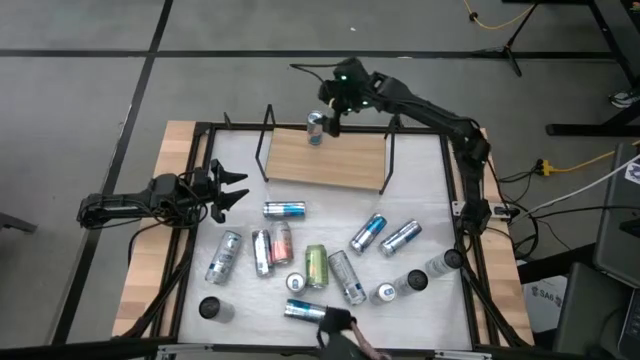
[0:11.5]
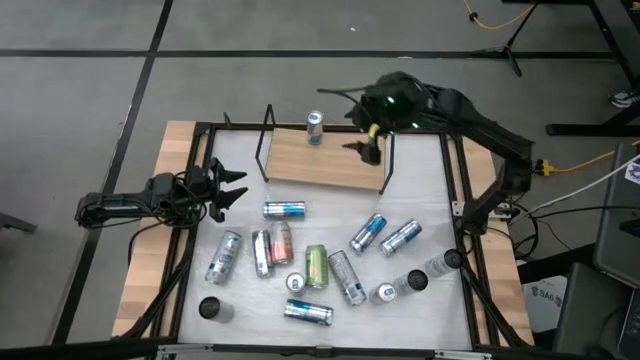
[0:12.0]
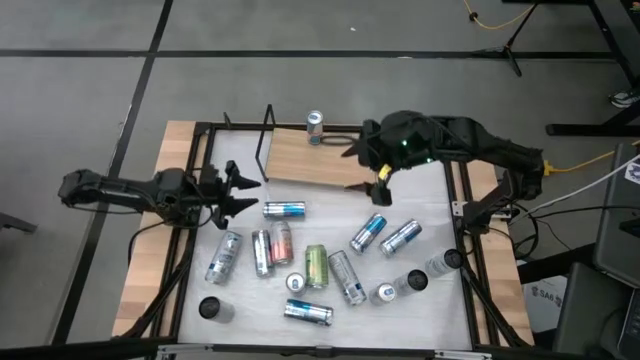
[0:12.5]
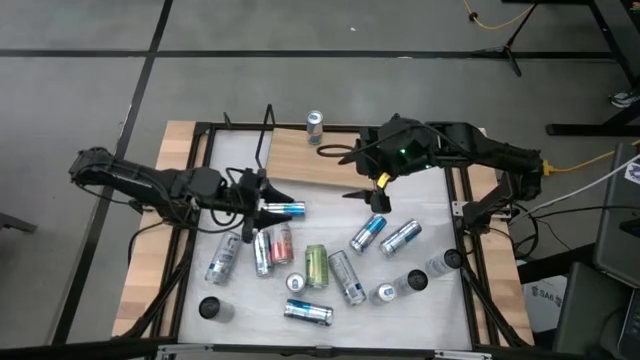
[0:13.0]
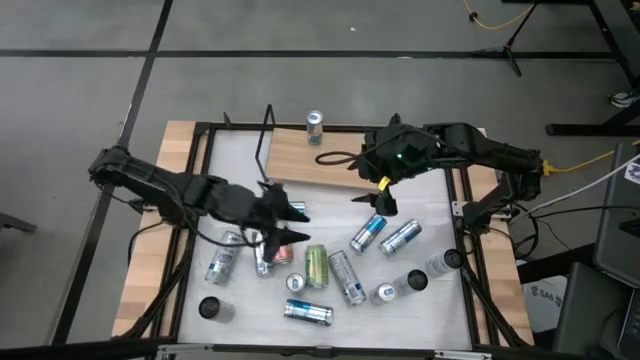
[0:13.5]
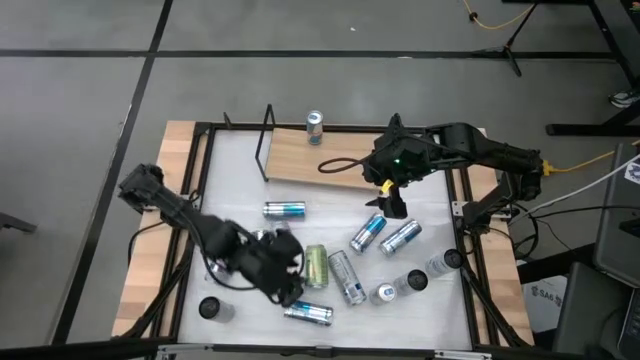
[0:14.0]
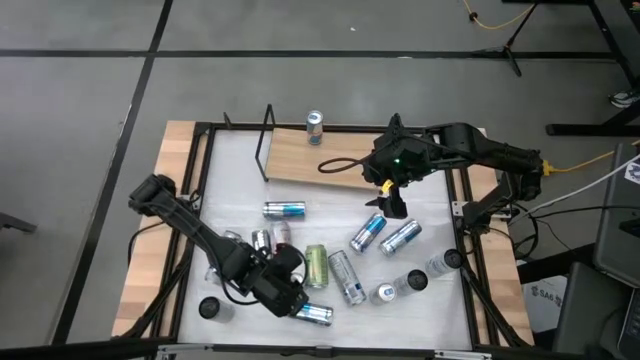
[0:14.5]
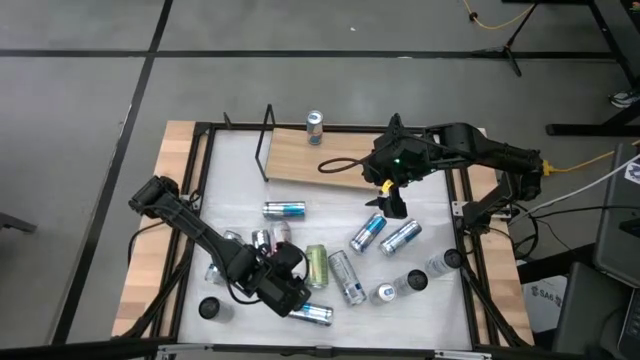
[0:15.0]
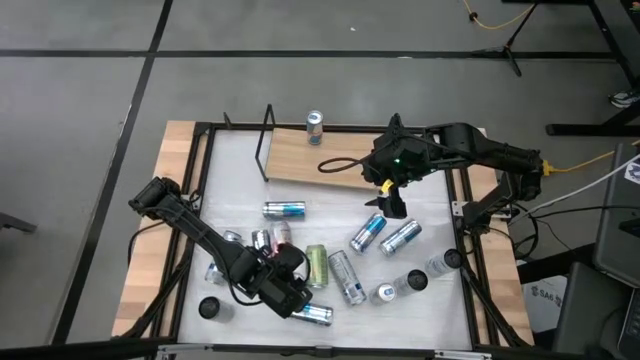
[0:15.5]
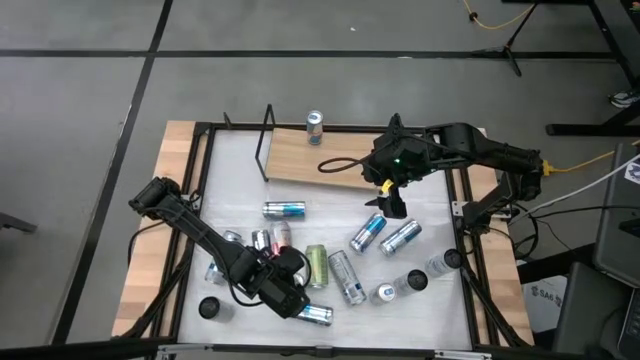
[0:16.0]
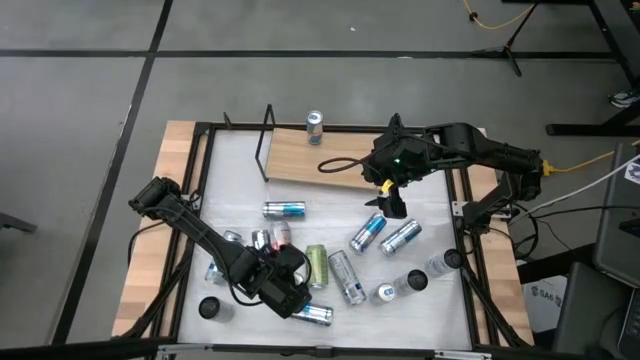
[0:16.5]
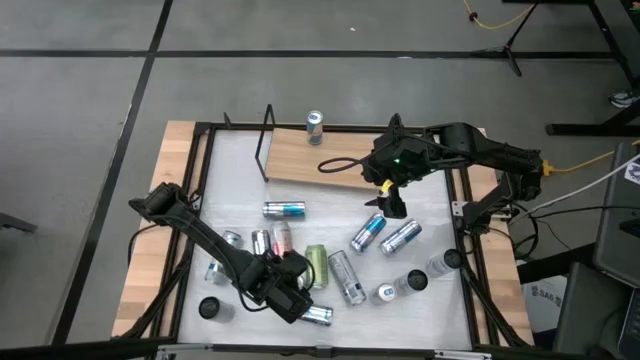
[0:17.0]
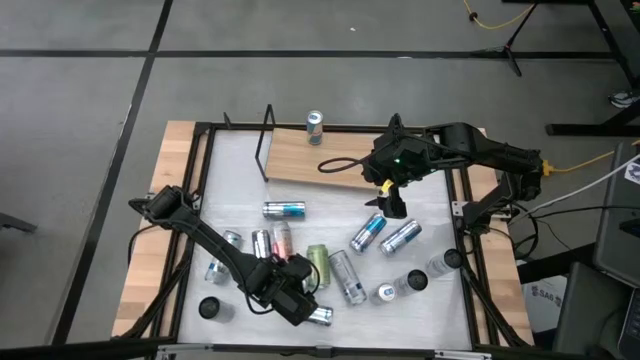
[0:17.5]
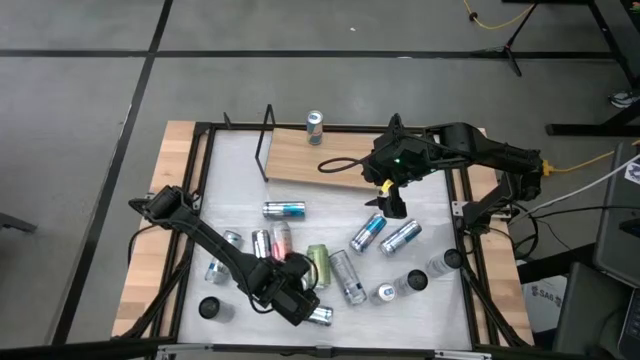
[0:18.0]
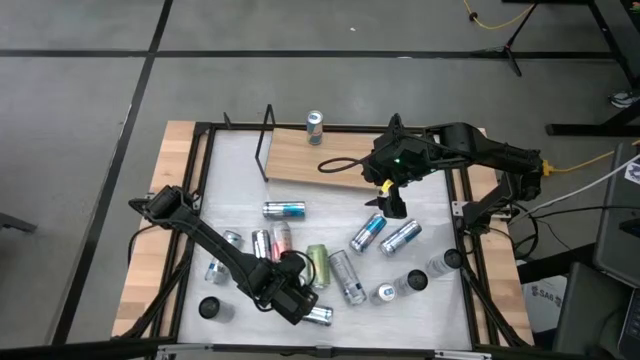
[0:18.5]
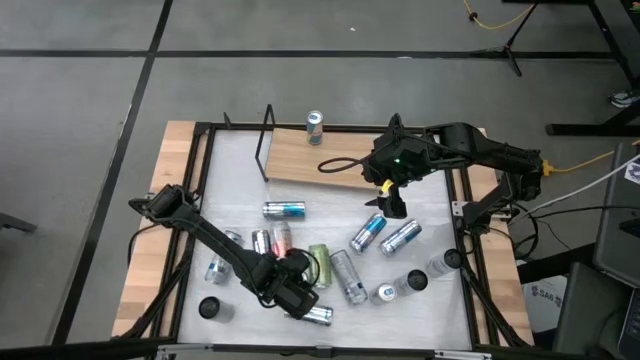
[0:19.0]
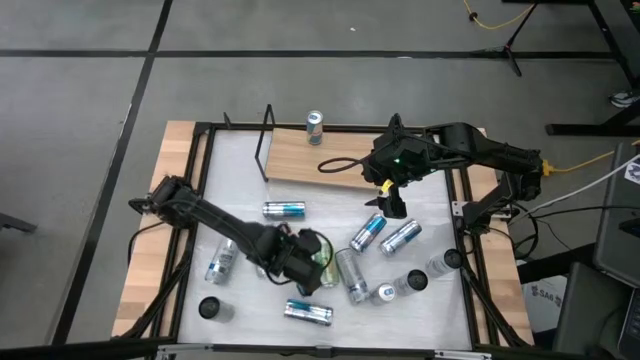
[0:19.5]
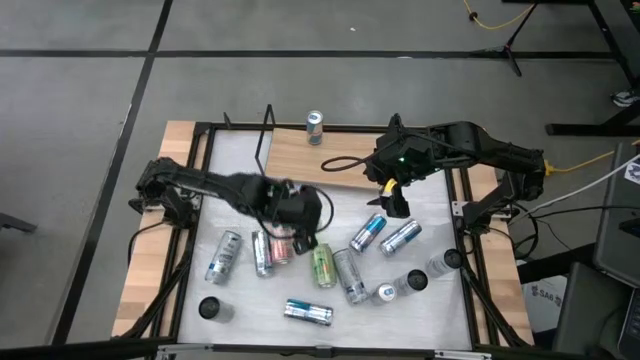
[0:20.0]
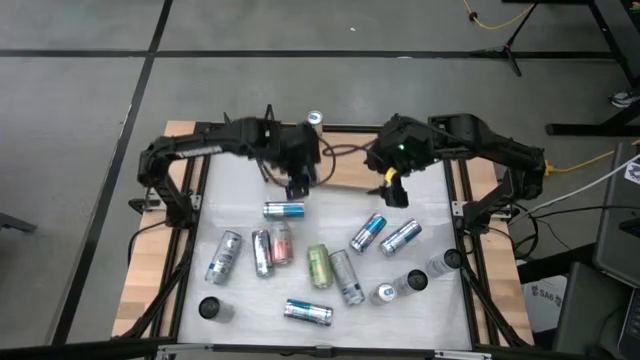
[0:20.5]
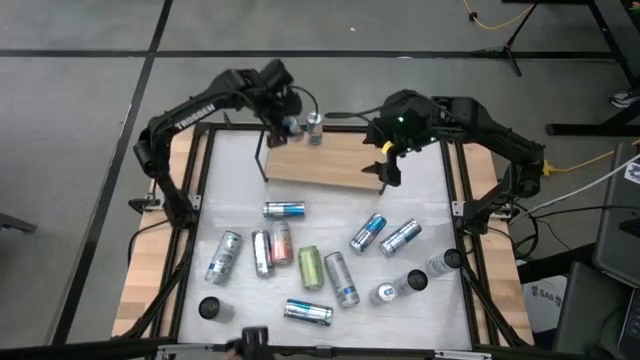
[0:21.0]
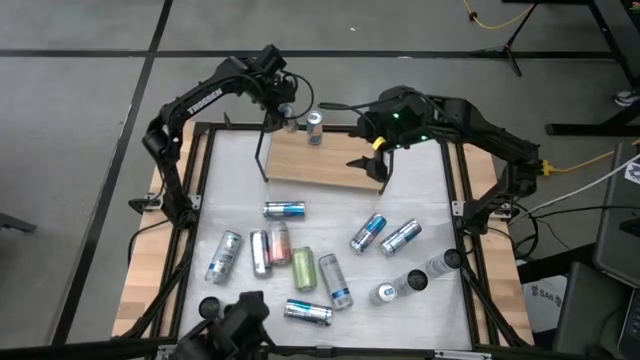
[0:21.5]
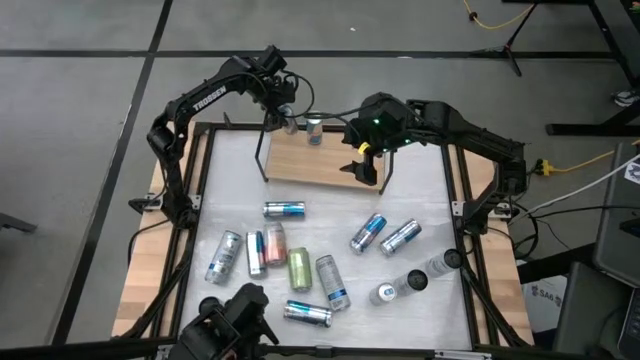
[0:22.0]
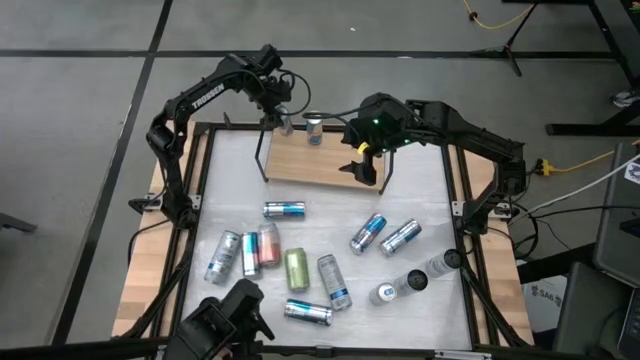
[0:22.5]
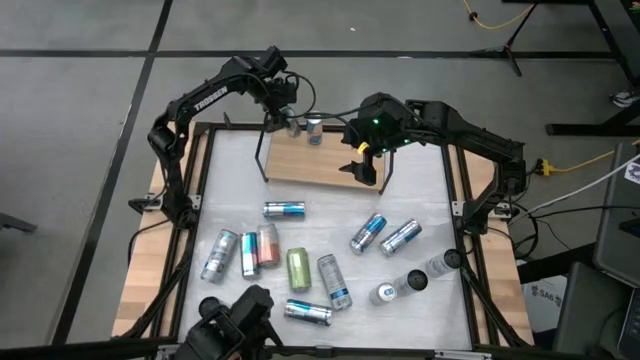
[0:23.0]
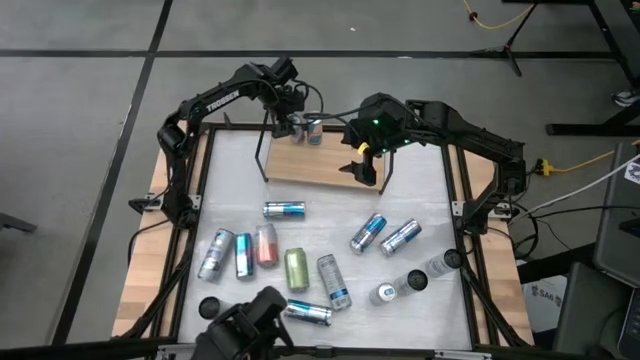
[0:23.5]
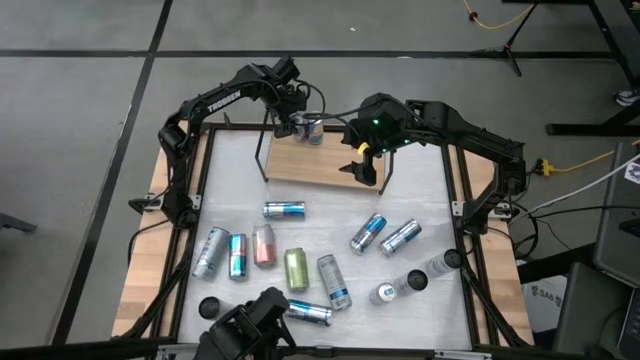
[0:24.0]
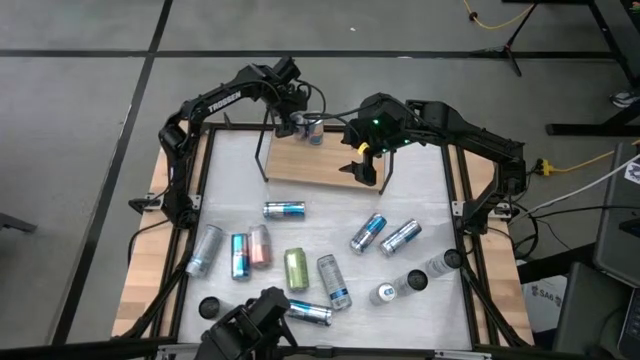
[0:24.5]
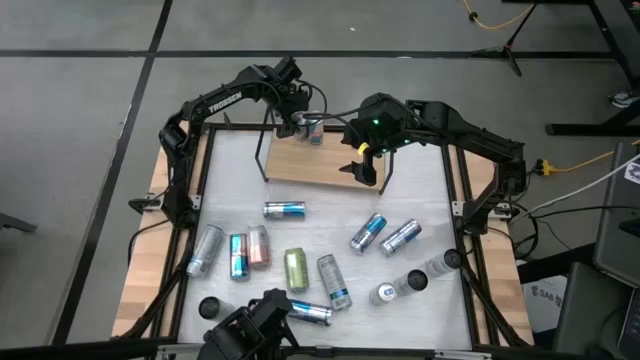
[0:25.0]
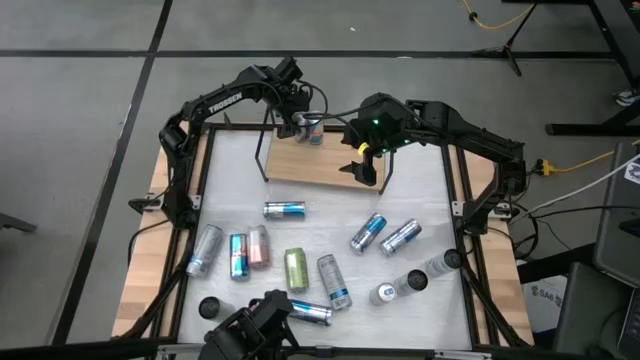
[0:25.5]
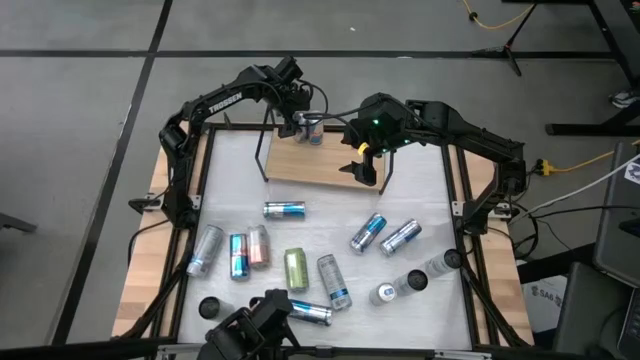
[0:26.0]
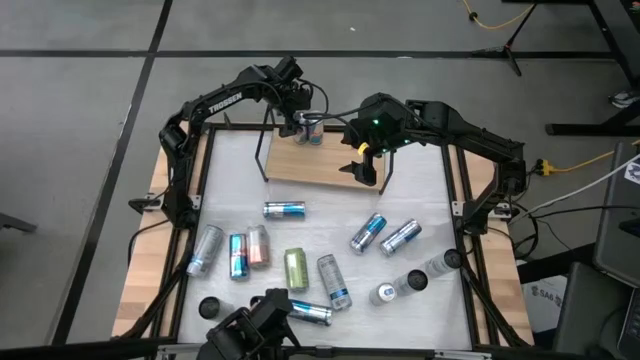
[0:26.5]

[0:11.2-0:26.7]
Task: Place canned beverage on shelf
Put the blue soda can on the shelf

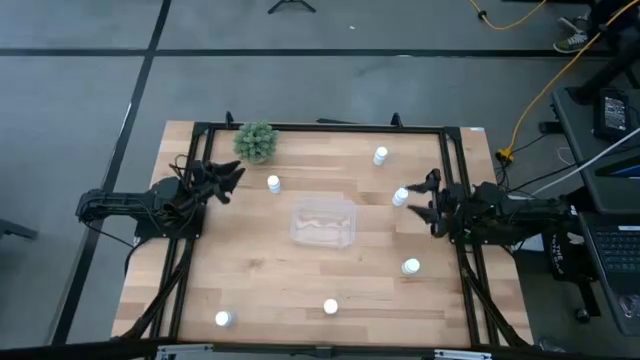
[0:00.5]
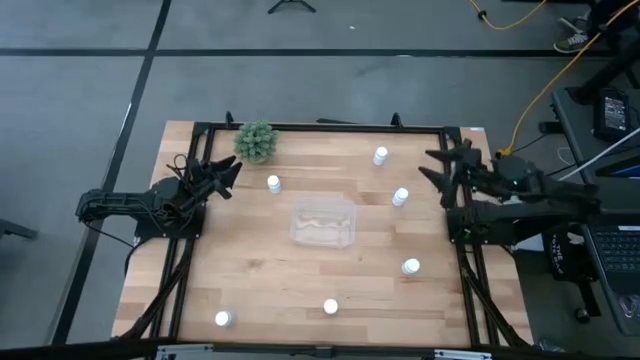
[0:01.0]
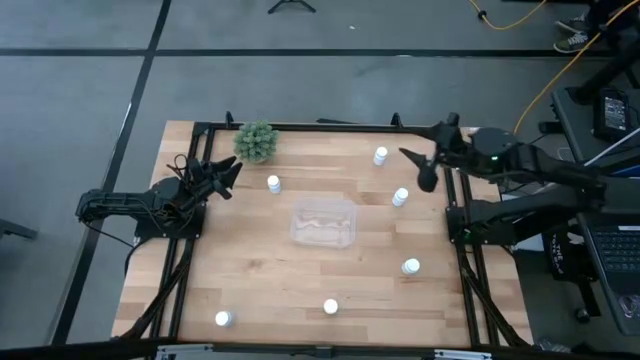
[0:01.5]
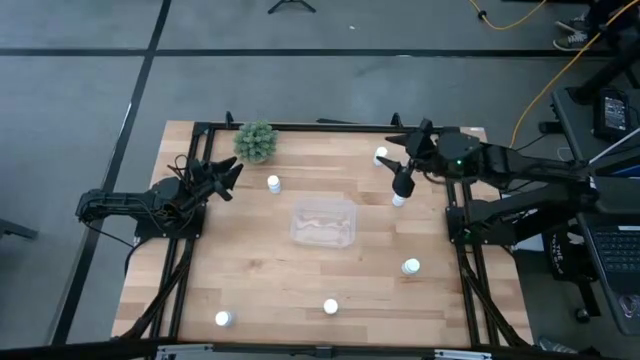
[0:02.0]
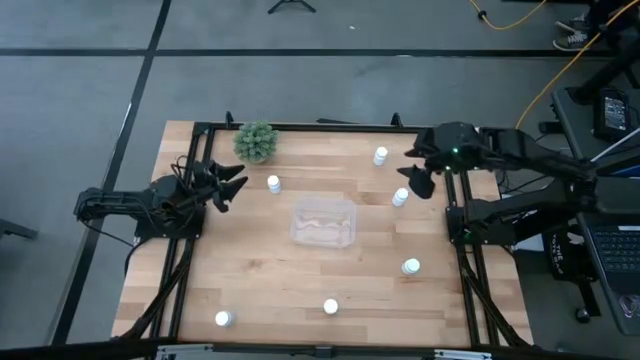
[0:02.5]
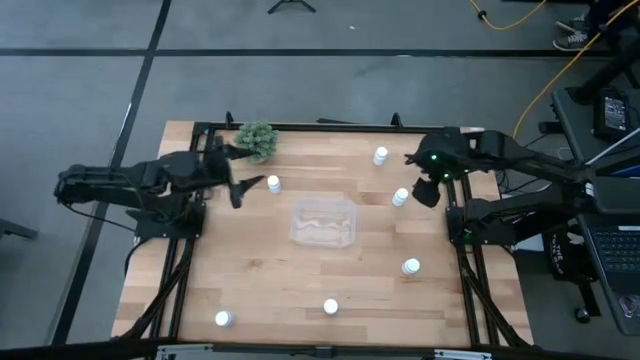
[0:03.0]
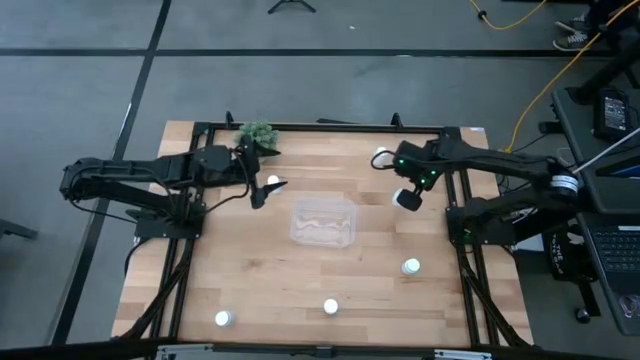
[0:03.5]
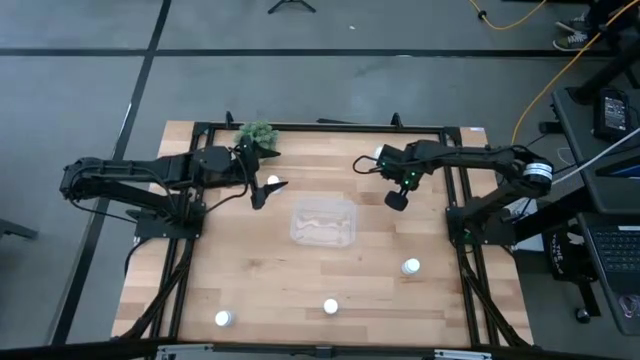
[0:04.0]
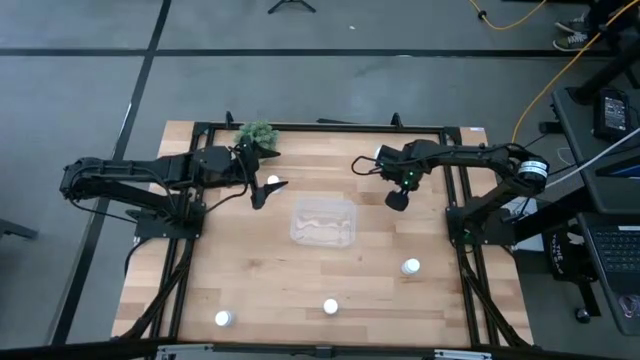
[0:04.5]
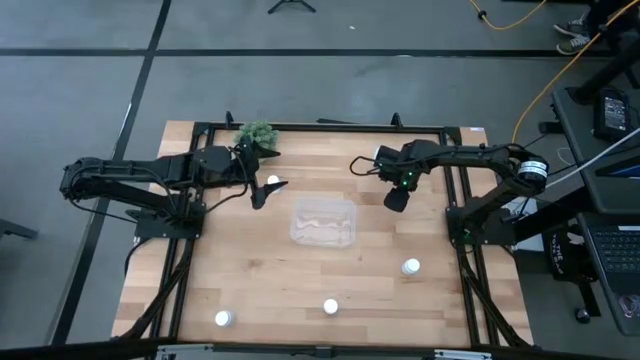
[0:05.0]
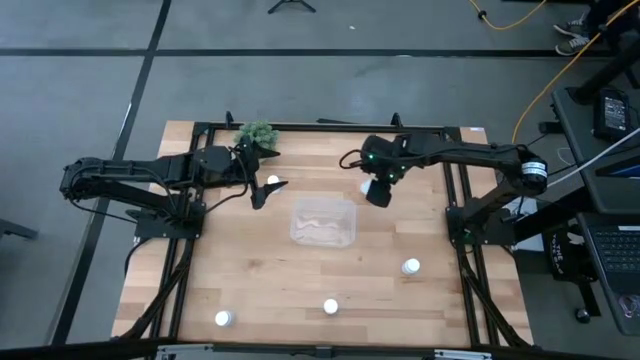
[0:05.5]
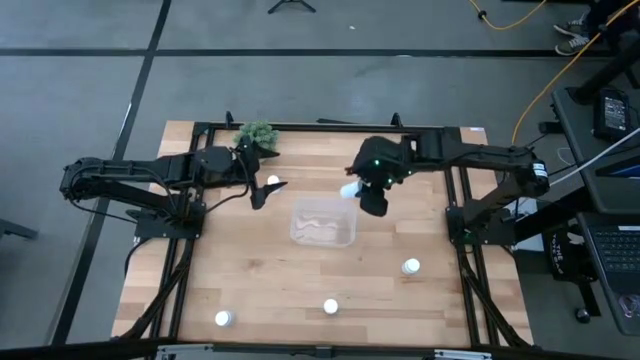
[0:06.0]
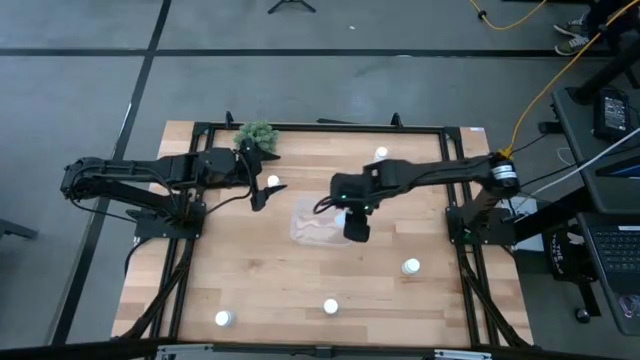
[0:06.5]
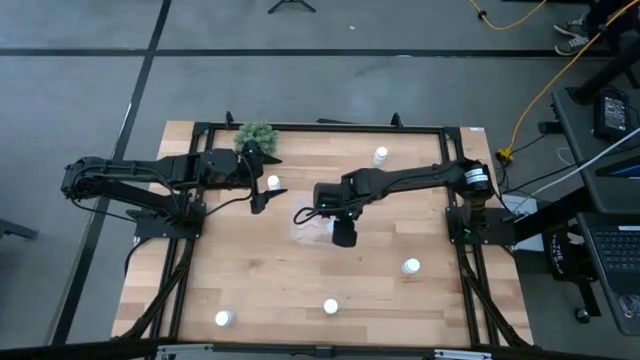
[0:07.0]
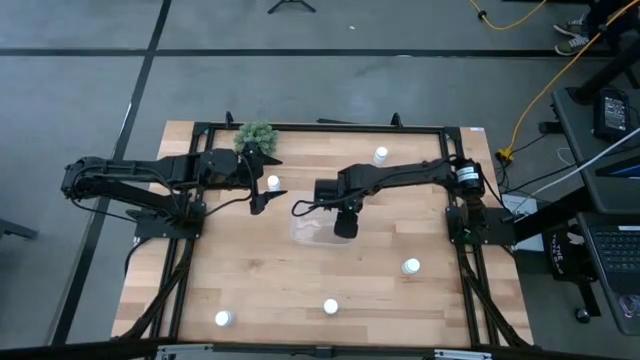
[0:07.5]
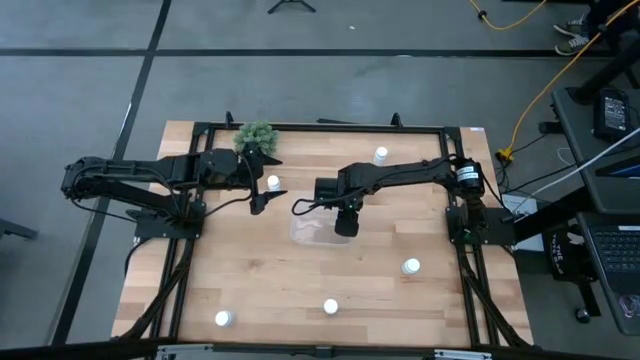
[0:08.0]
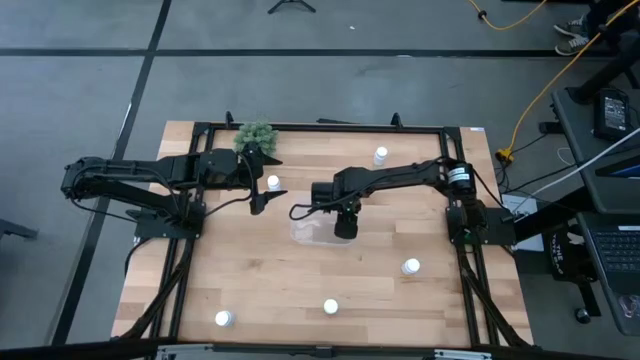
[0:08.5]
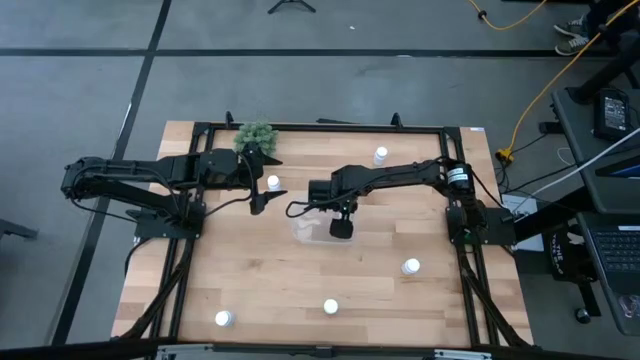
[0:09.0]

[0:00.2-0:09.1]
Task: Pick and place pill bottles into a basket
Put the white medicine bottle into the transparent bin
